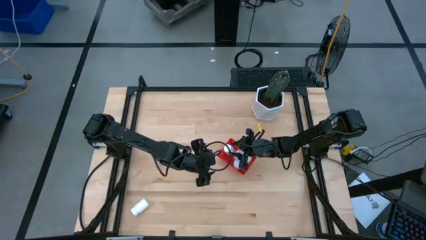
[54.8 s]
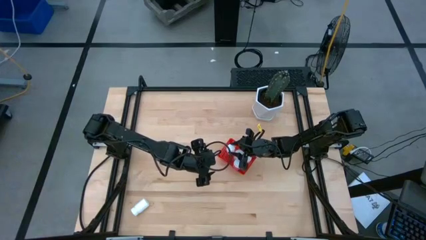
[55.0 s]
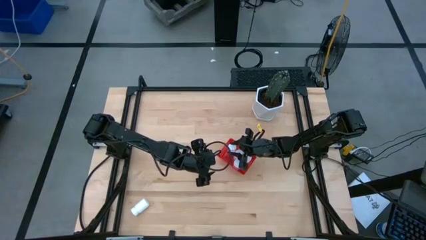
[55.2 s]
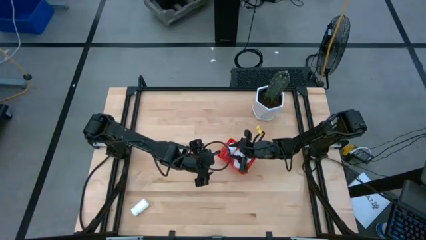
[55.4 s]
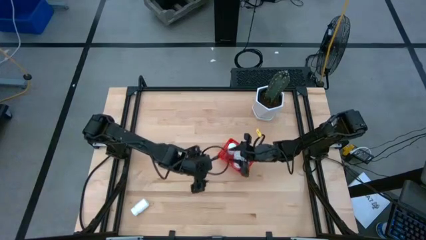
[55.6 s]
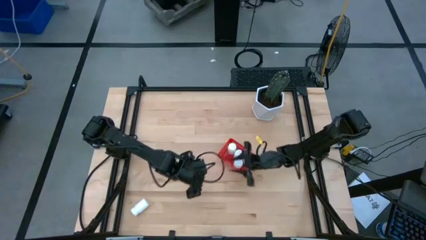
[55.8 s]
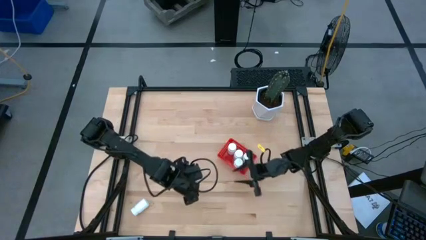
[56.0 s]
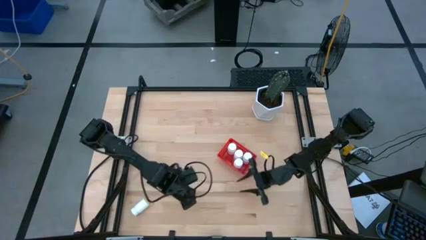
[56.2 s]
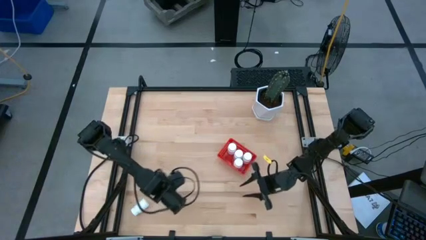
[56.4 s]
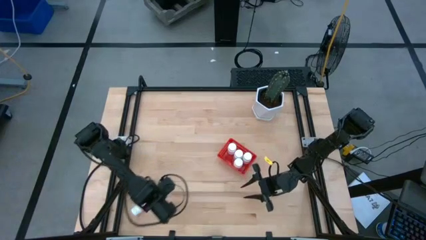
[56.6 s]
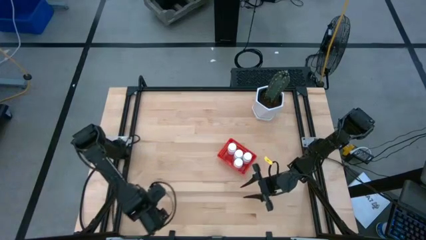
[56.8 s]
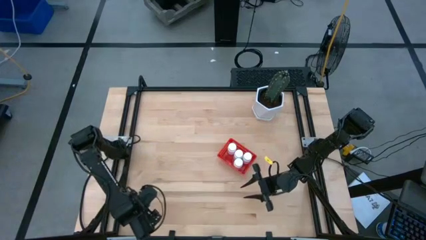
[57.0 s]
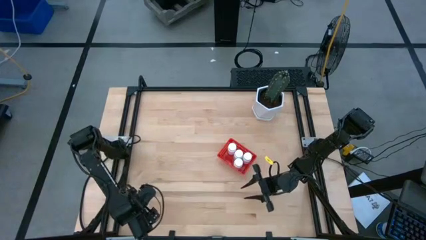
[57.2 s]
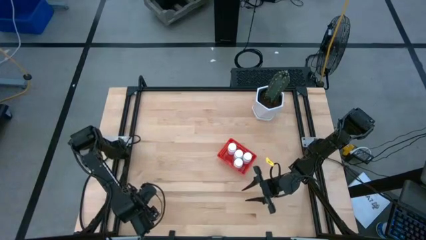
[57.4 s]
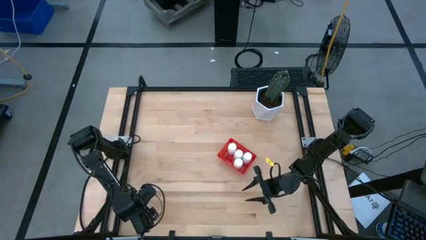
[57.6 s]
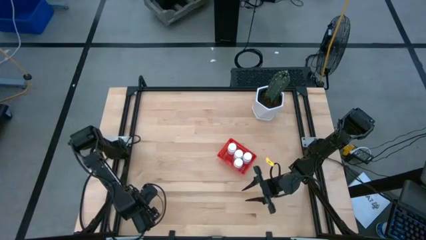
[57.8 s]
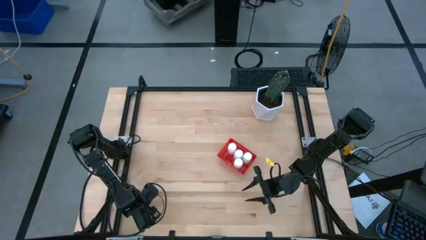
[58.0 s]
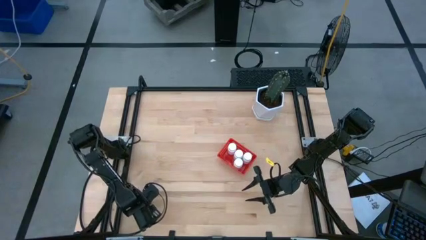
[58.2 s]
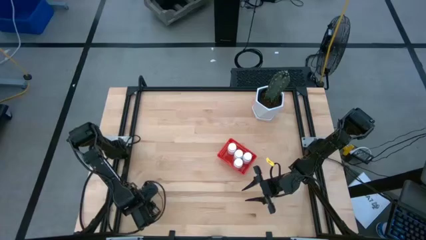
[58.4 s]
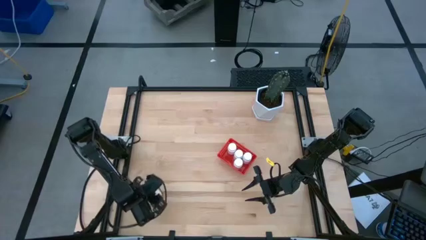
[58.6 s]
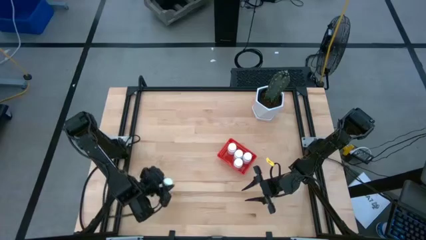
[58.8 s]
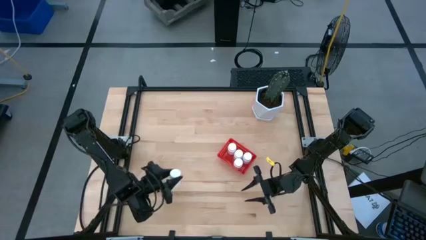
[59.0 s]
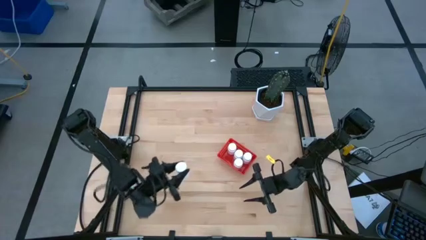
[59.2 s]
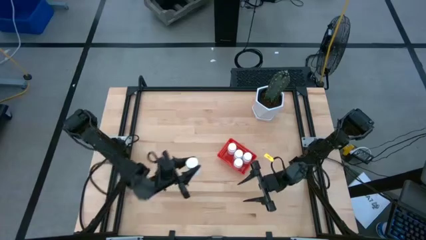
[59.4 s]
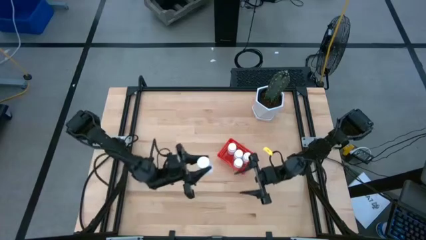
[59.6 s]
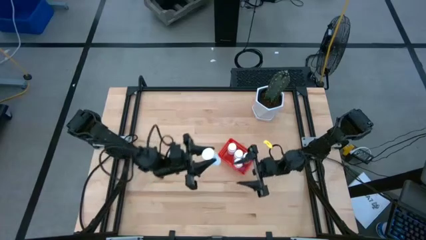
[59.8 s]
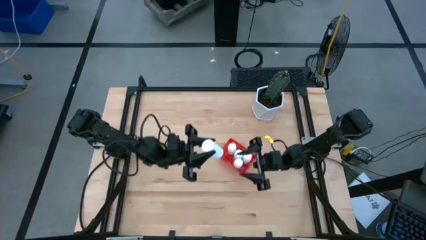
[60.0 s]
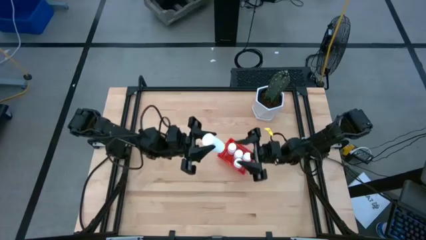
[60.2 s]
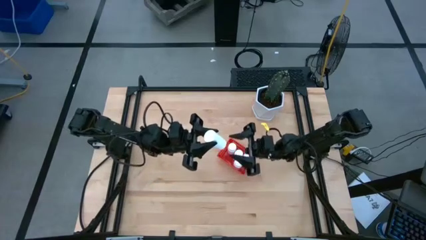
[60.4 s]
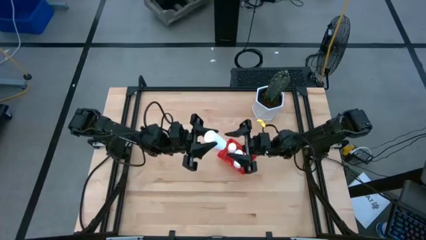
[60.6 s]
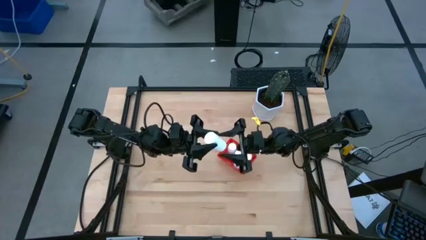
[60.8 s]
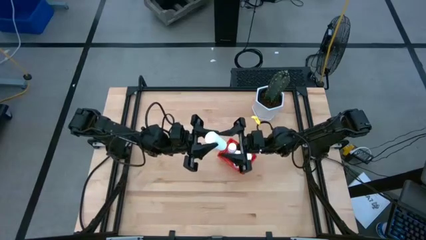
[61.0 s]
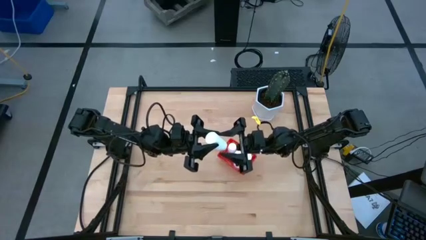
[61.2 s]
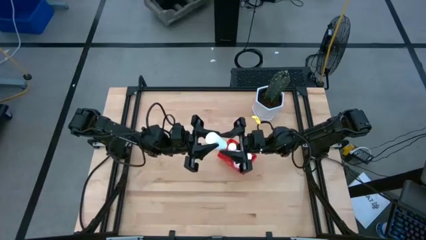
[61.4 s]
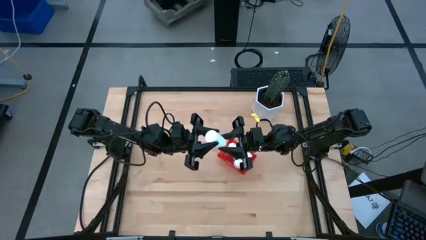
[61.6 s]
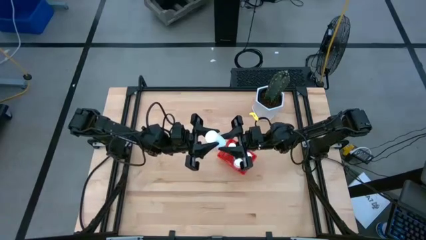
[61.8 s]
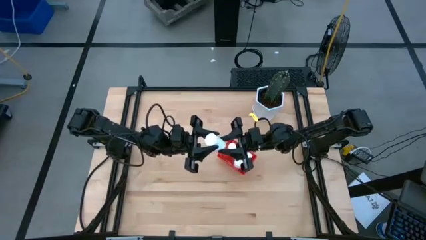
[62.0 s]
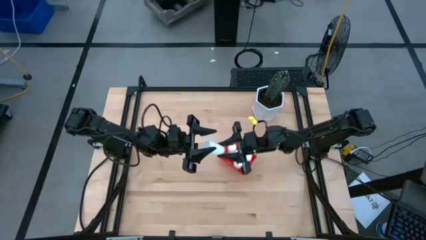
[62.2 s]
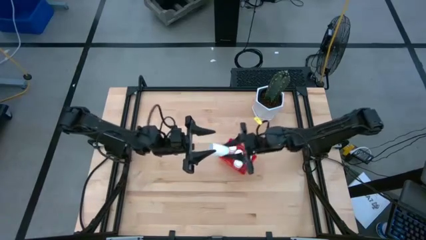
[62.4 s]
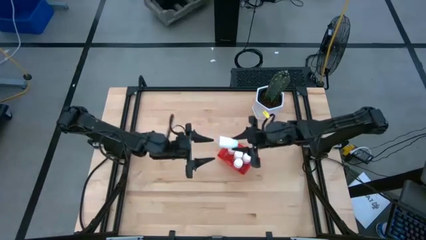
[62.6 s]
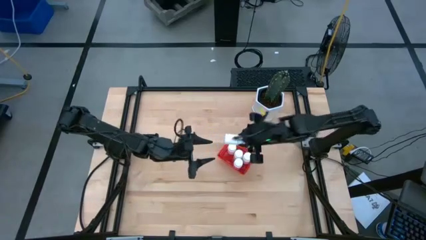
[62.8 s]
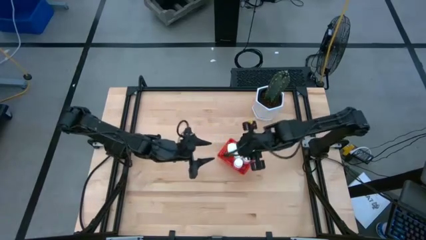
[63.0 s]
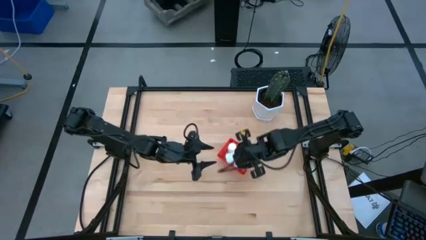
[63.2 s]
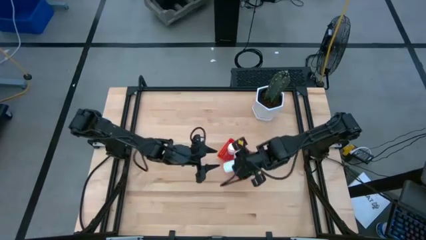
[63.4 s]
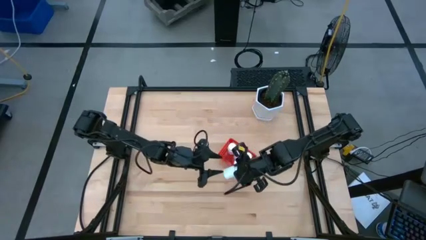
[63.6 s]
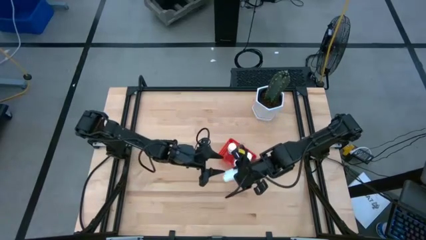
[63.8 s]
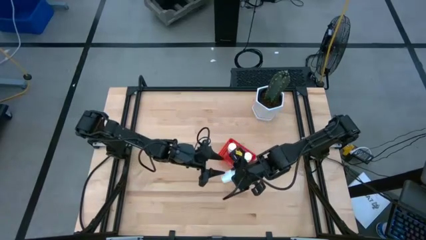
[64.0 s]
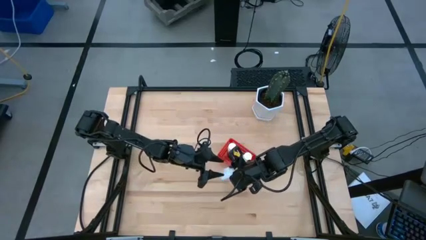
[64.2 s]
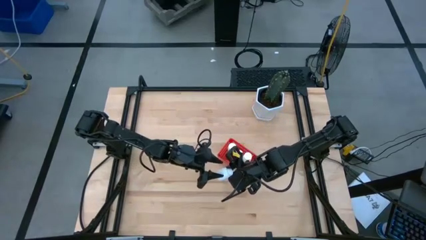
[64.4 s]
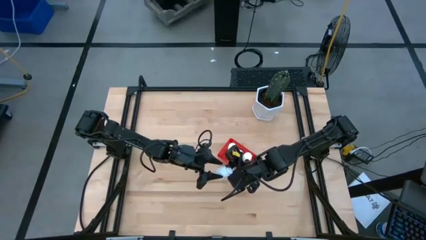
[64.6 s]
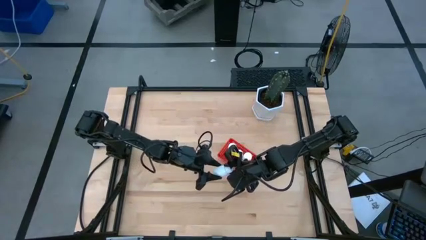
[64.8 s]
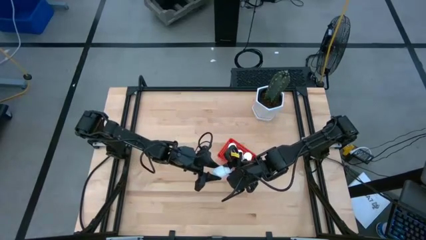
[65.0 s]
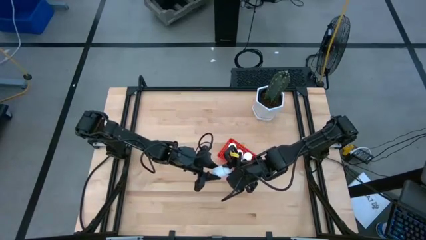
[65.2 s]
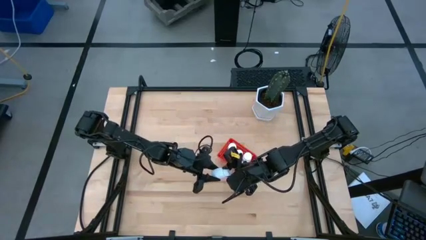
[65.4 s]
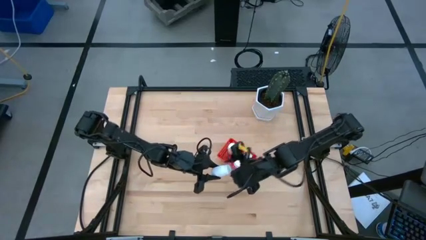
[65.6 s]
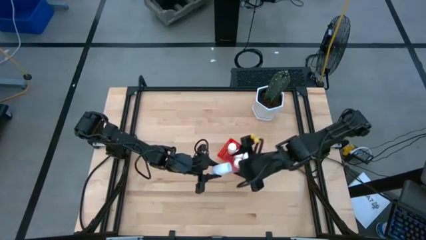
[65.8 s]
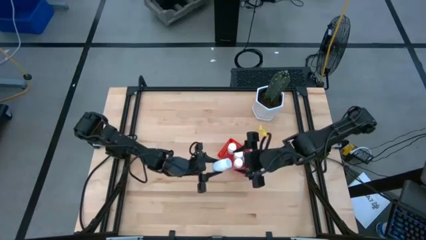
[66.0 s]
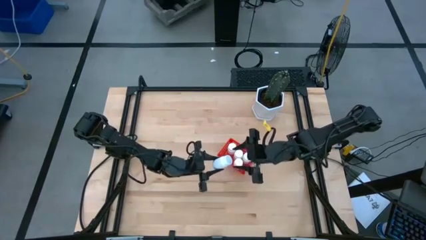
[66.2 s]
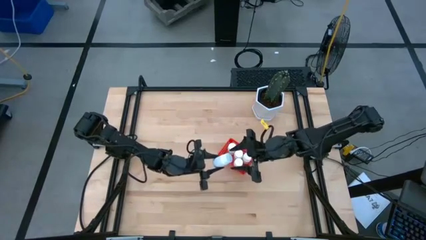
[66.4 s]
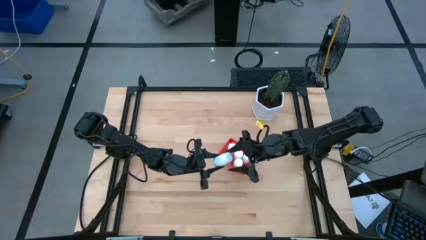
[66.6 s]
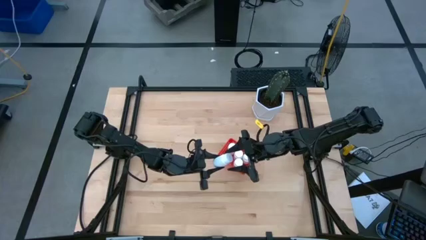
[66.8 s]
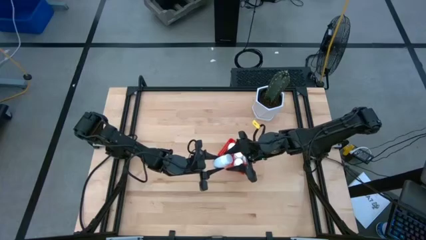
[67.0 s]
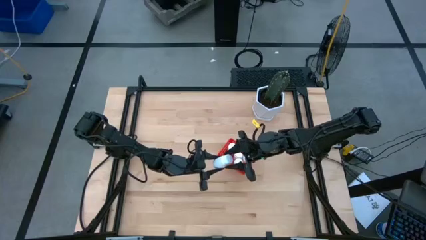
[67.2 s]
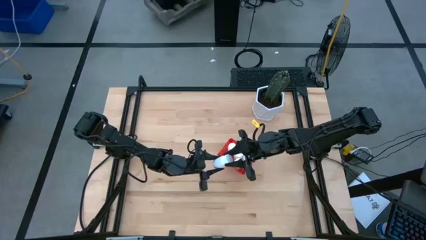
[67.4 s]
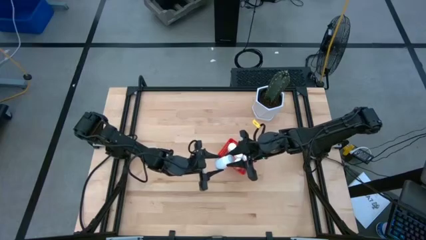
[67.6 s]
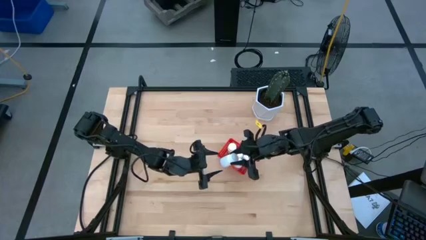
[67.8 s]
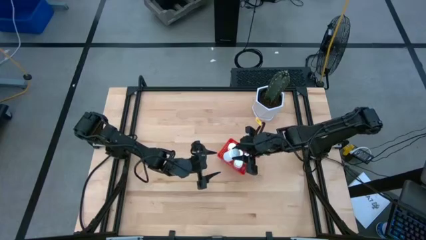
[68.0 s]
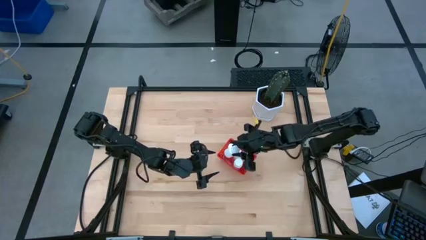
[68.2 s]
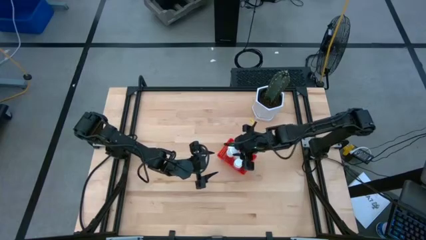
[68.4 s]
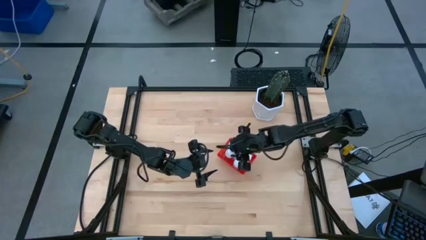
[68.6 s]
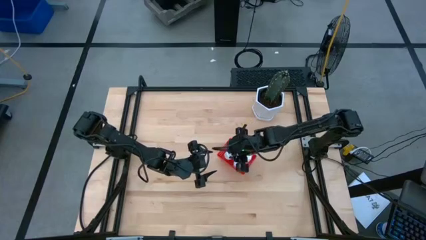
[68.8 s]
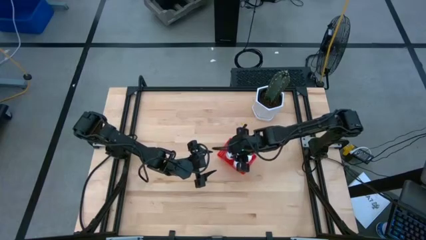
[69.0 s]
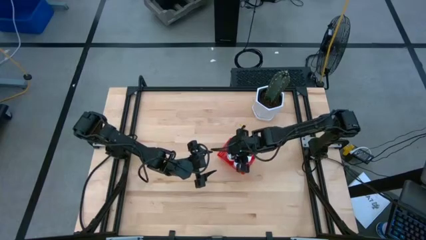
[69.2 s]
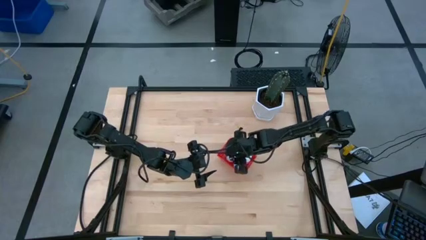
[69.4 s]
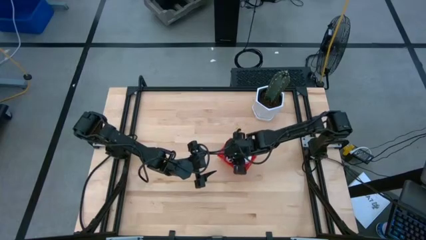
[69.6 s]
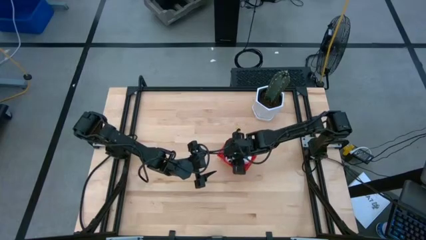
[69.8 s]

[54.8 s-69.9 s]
Task: Pick and place pill bottles into a basket
Put the white pill bottle into the red bin
